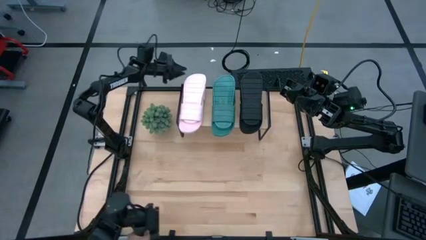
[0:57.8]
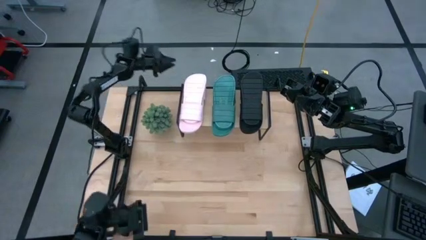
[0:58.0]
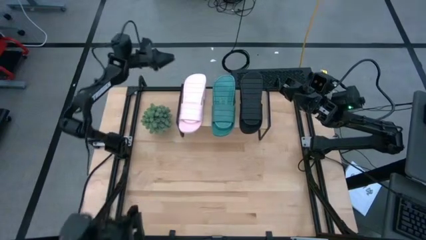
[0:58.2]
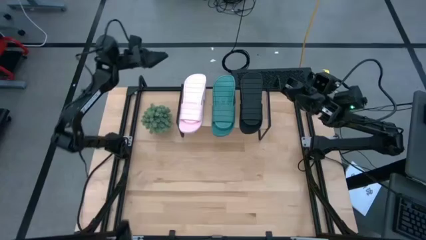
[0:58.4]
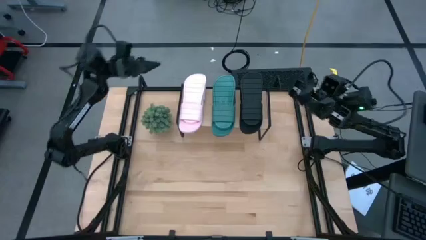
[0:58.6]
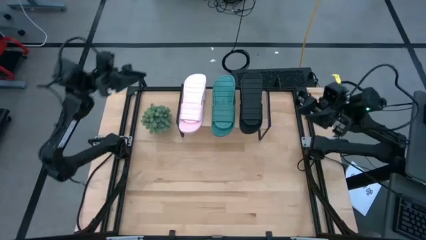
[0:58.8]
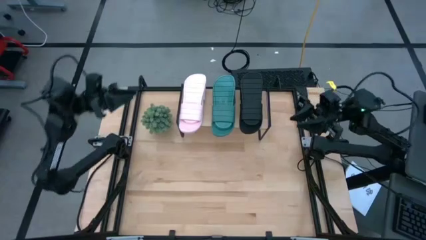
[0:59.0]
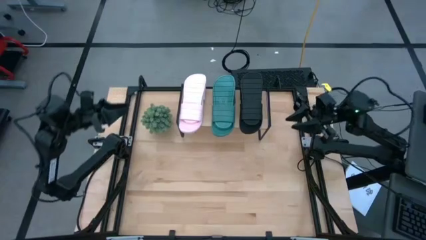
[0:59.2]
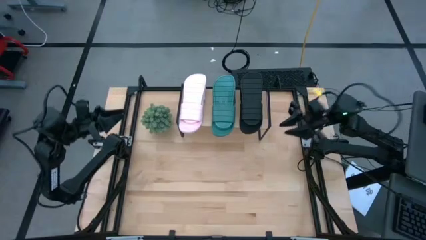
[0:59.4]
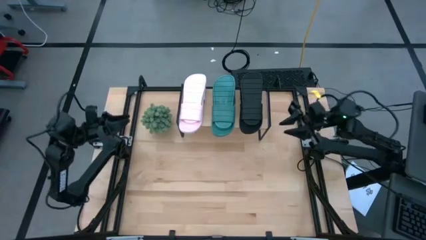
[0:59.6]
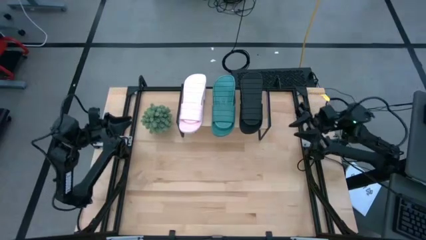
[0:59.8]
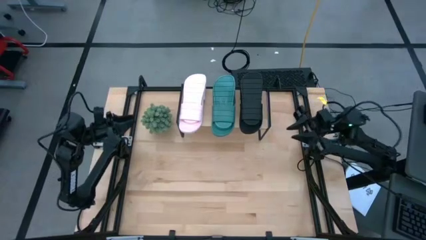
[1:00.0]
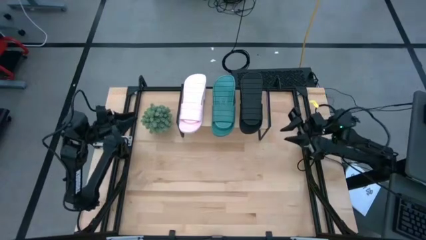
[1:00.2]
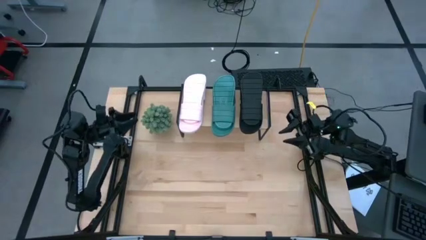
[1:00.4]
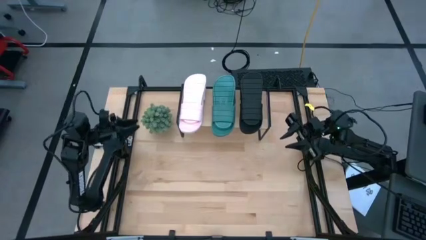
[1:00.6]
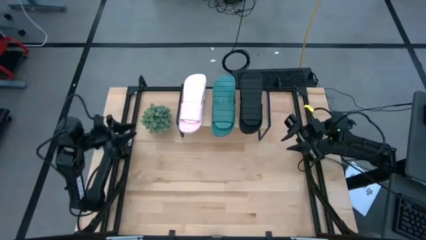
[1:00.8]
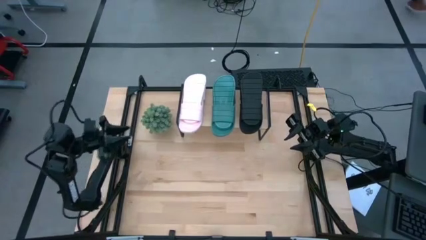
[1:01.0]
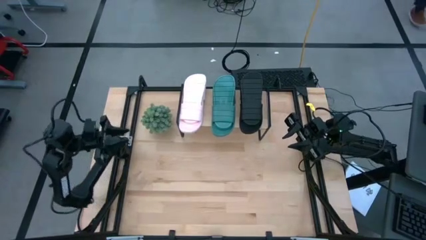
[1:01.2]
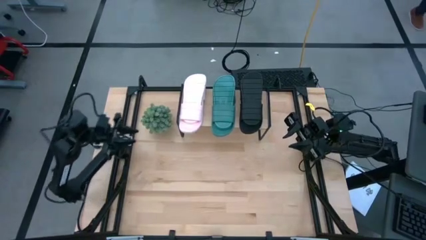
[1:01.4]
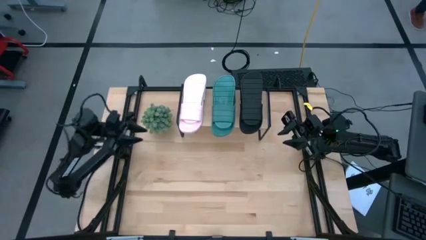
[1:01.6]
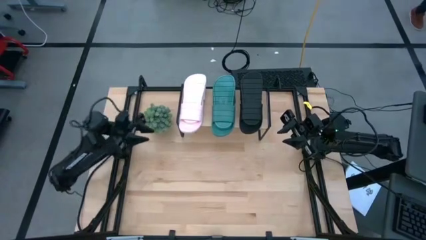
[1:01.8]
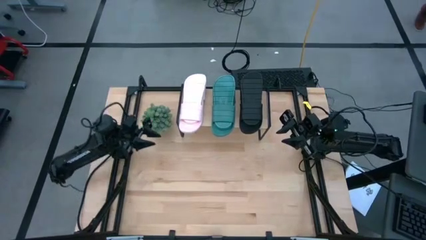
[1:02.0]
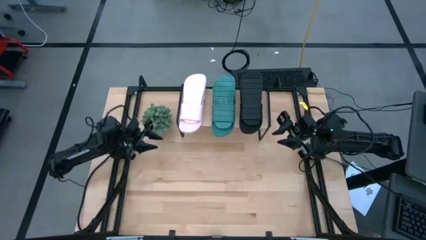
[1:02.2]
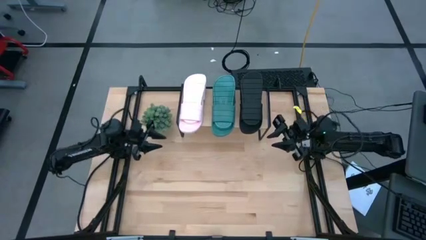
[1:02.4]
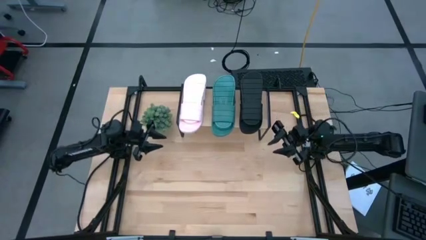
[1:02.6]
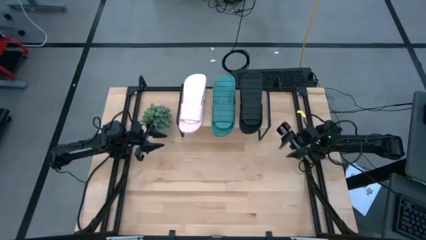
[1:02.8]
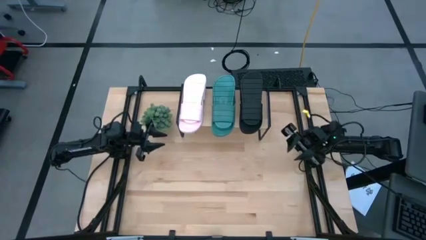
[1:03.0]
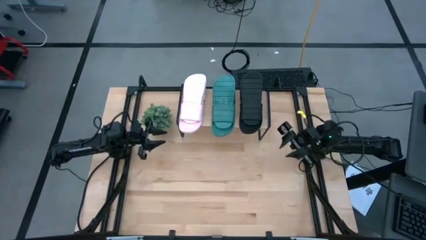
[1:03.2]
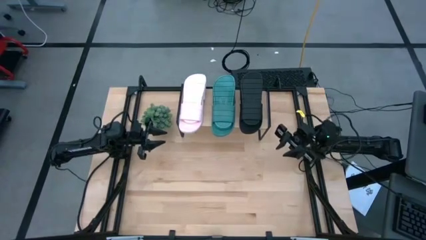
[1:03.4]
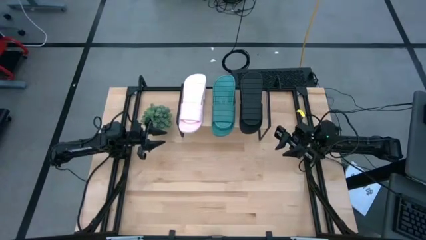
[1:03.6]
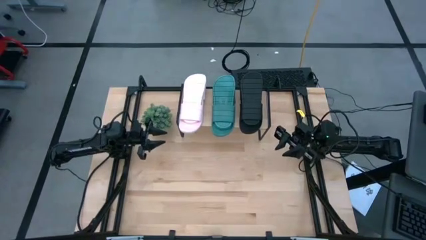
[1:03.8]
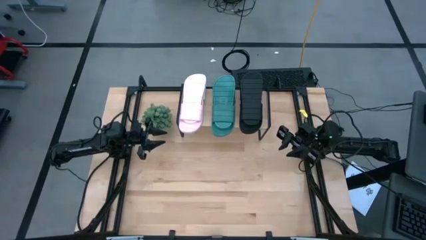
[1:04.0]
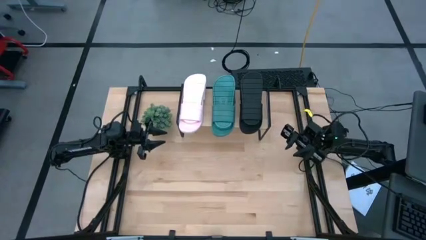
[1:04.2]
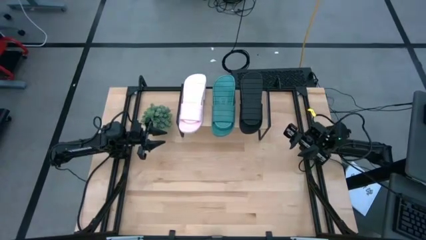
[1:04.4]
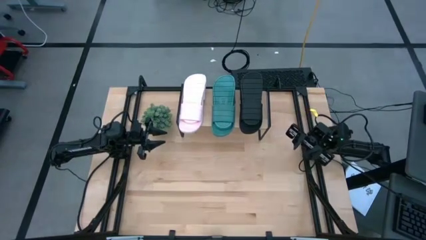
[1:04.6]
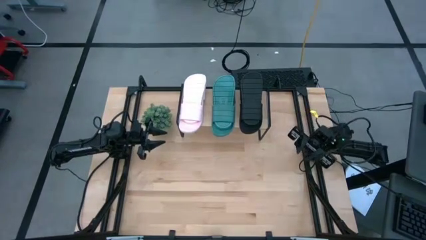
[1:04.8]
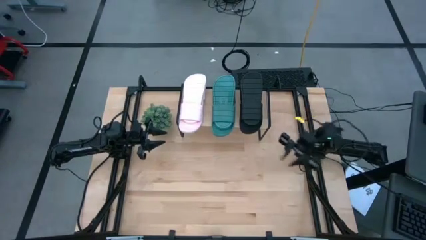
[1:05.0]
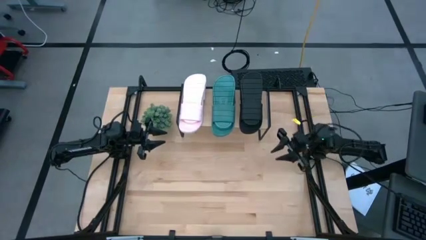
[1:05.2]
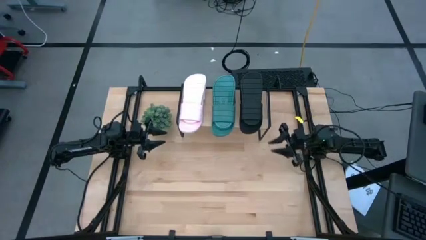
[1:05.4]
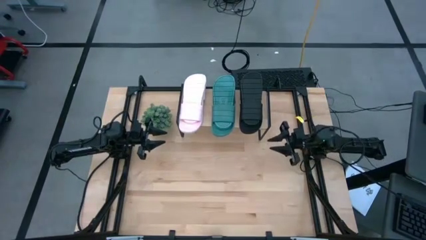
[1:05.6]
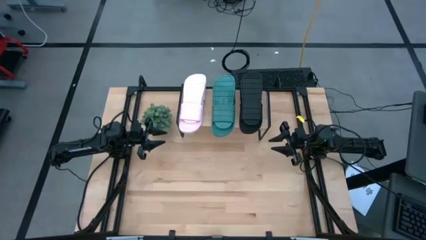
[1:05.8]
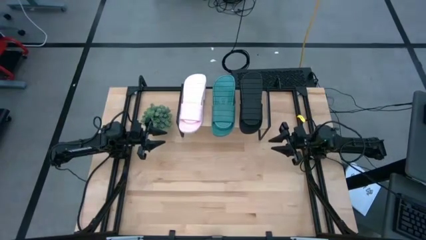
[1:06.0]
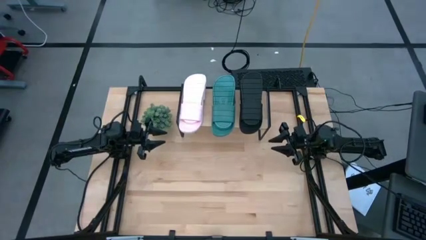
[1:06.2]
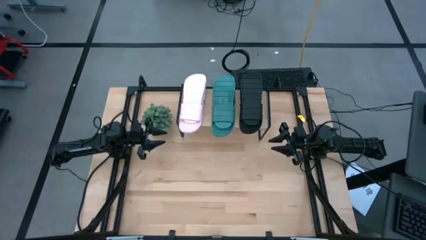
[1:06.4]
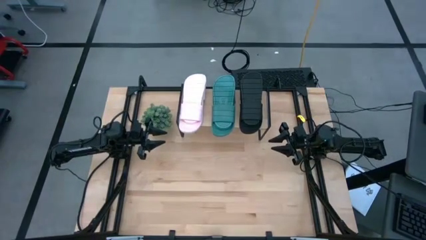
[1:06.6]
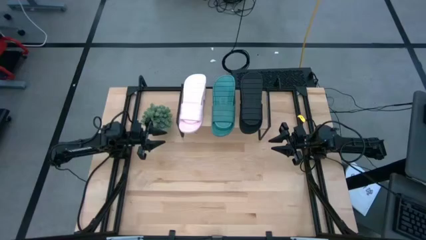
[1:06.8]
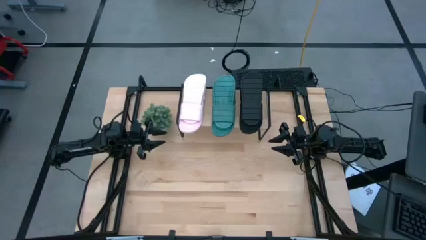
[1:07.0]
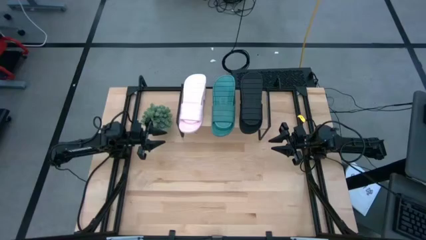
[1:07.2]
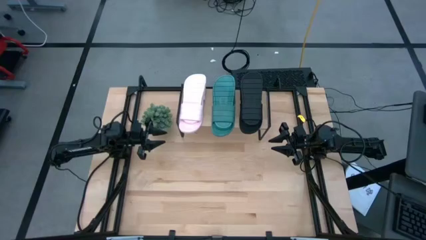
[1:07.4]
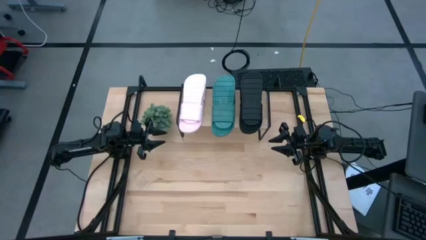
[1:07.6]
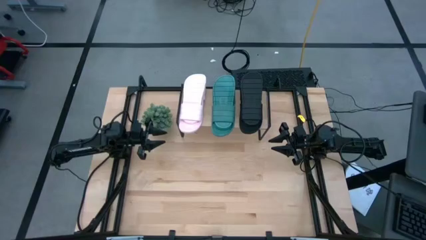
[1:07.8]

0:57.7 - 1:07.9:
Task: Pick and place slides into the shelf
Return to Home Position

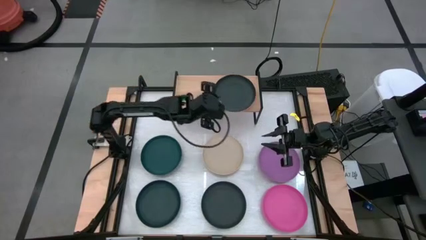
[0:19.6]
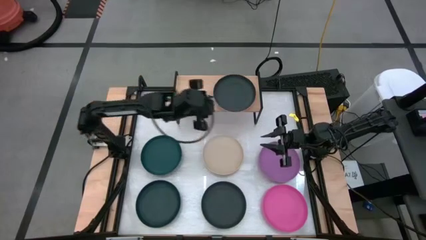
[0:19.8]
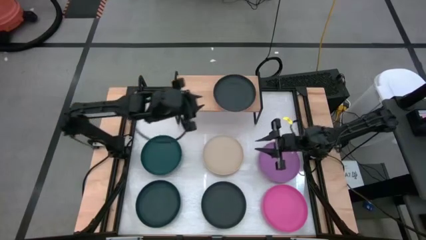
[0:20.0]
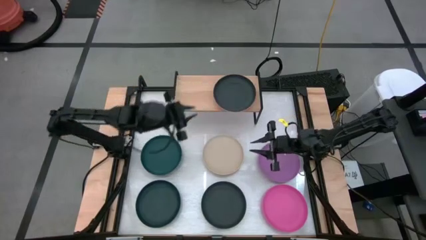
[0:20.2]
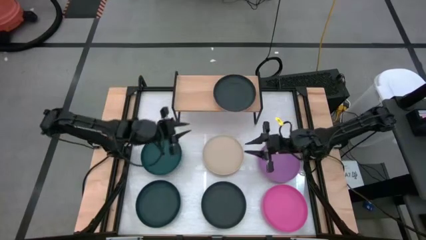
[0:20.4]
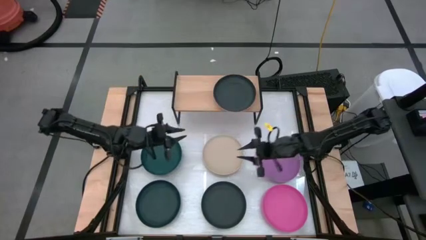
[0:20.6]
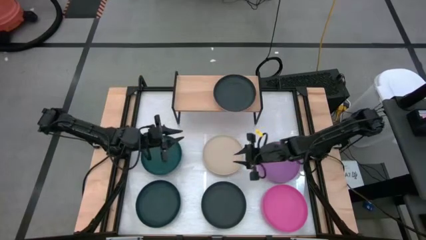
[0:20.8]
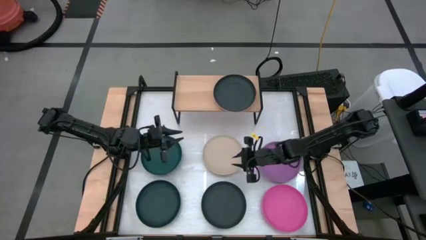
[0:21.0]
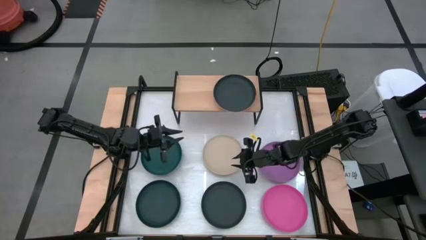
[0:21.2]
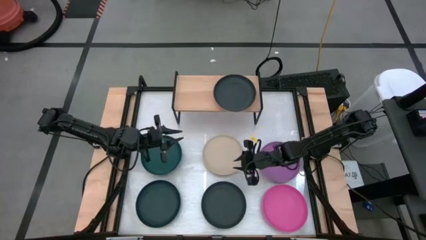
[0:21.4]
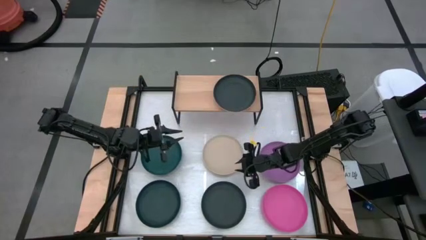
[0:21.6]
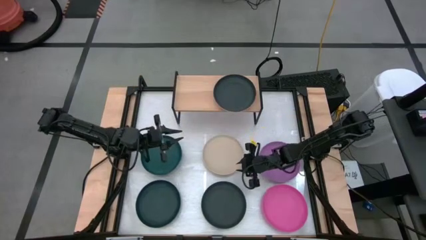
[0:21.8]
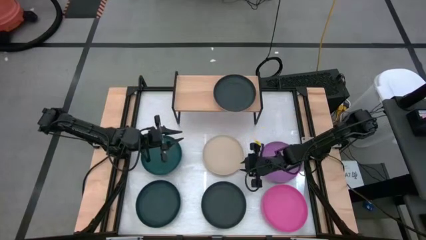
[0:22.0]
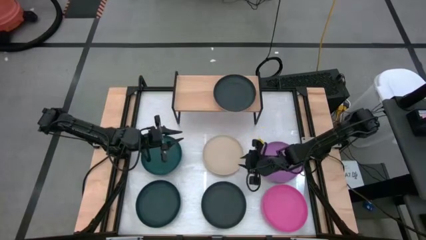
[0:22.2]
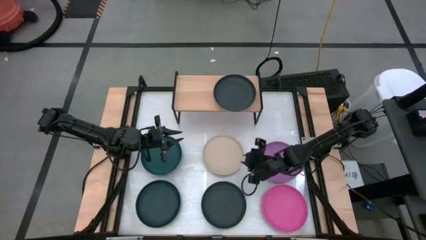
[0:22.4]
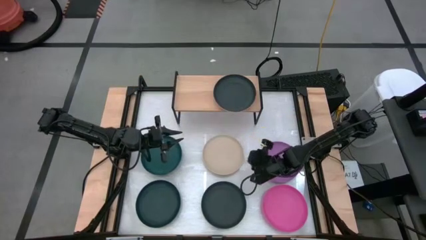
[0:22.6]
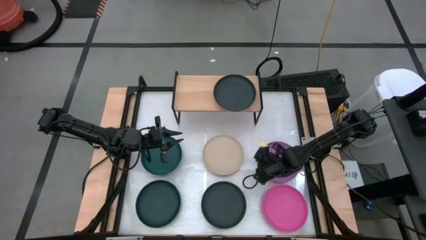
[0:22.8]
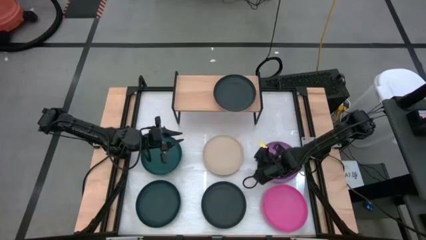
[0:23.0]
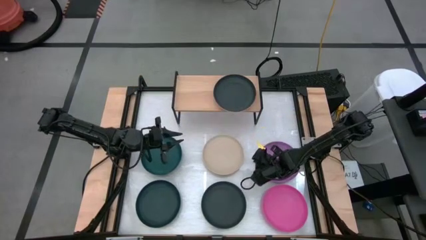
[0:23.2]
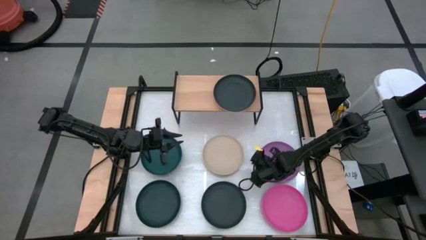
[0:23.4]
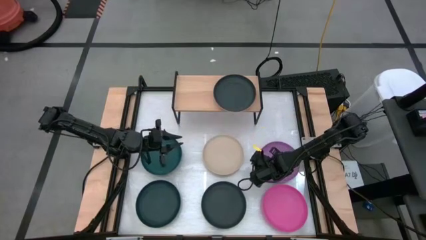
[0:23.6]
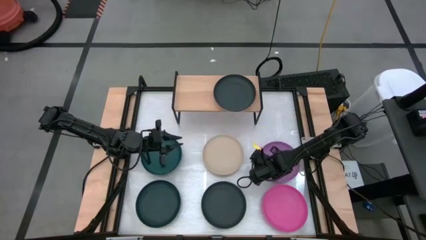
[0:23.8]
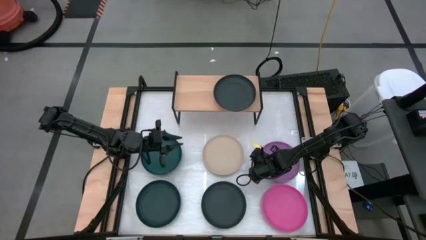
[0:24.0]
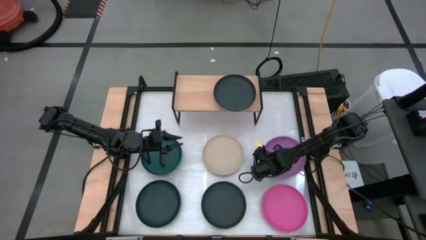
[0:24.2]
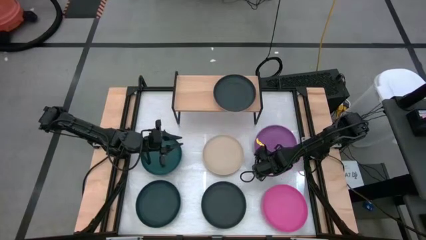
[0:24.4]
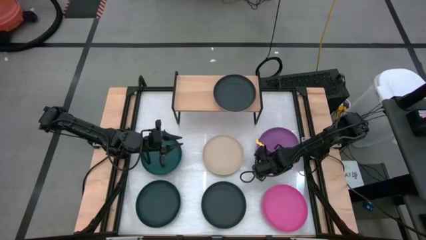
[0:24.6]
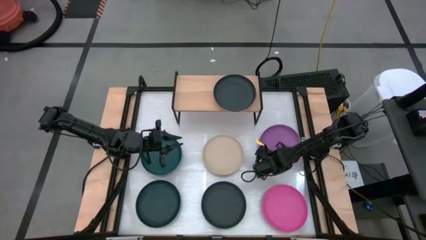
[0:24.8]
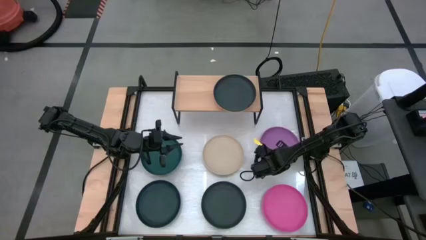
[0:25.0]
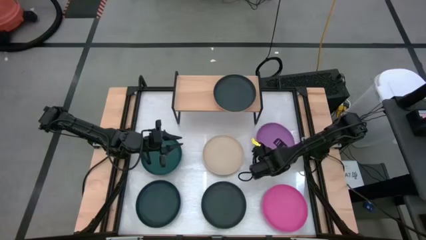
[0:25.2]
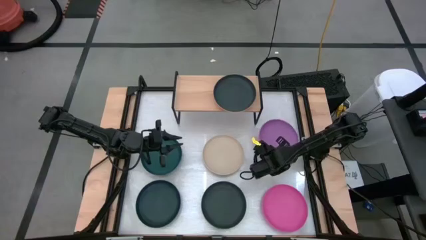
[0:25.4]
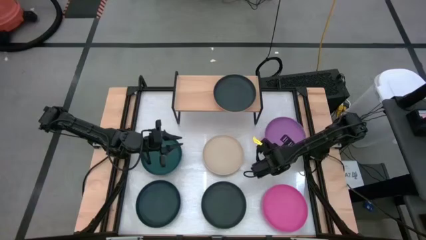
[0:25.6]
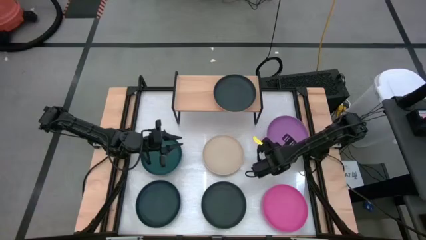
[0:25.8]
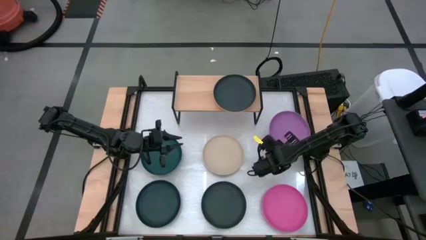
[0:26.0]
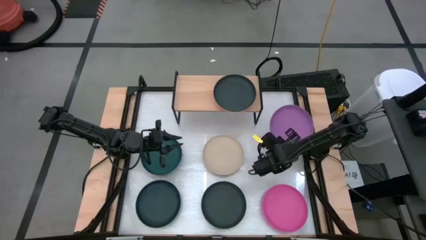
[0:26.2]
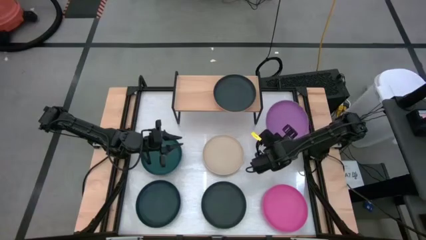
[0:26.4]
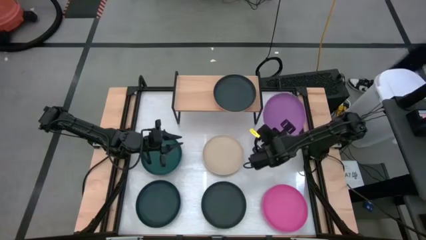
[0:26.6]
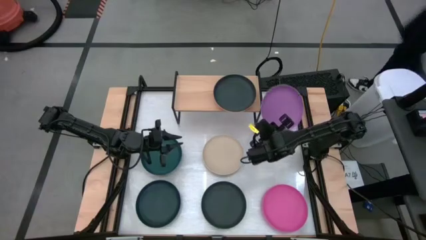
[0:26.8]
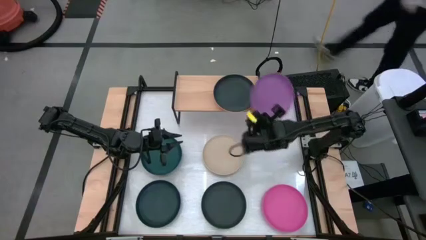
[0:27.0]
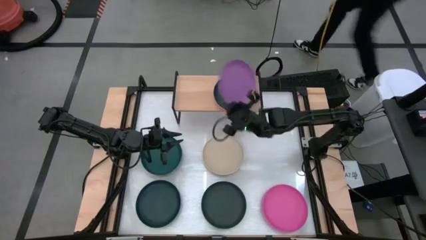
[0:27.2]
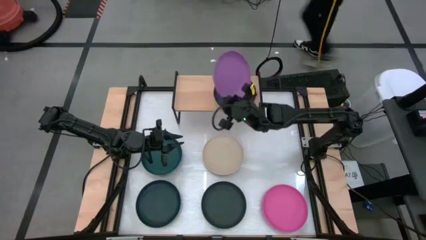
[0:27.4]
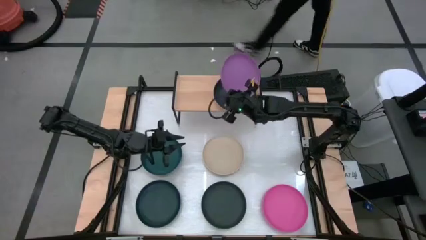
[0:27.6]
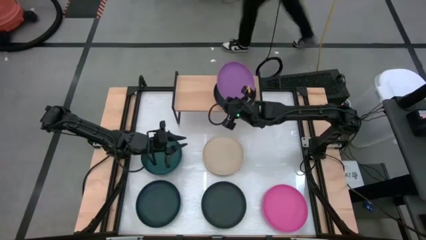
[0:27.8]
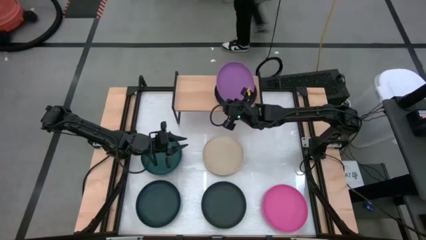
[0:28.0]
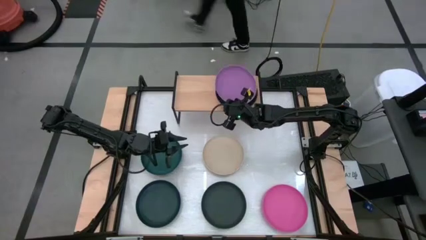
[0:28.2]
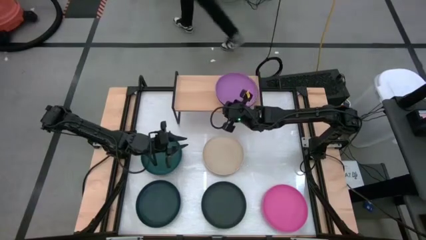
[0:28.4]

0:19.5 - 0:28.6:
Task: Place and stack plates onto a shelf
Stack the purple plate on top of the black plate on the shelf
